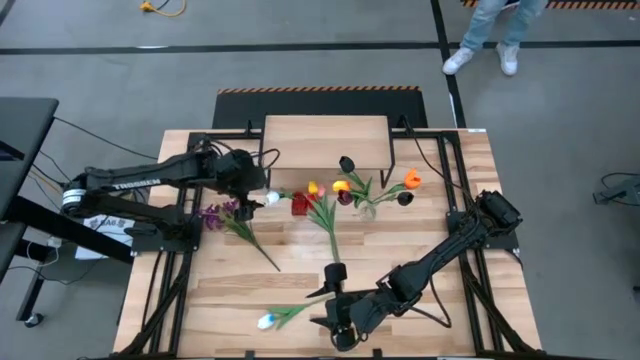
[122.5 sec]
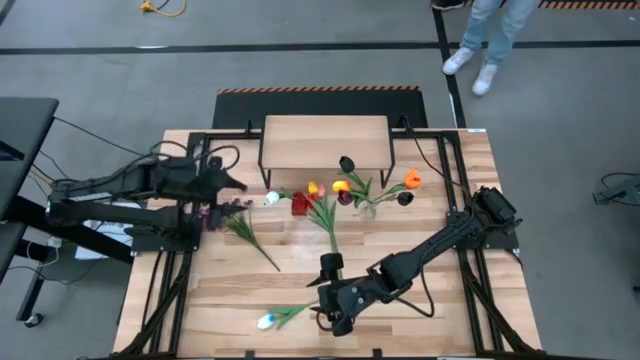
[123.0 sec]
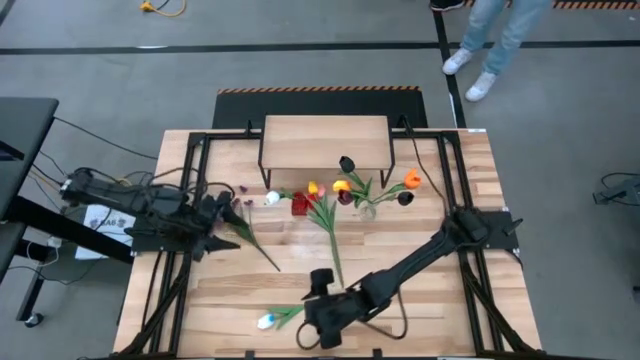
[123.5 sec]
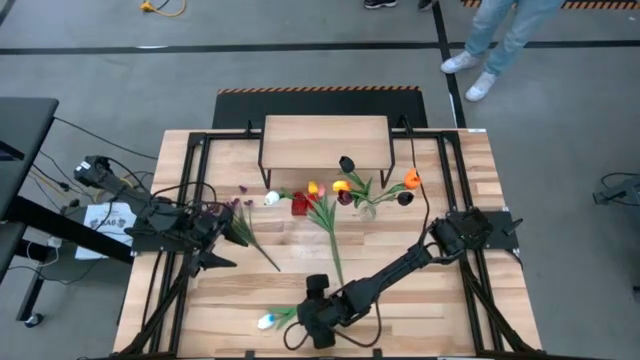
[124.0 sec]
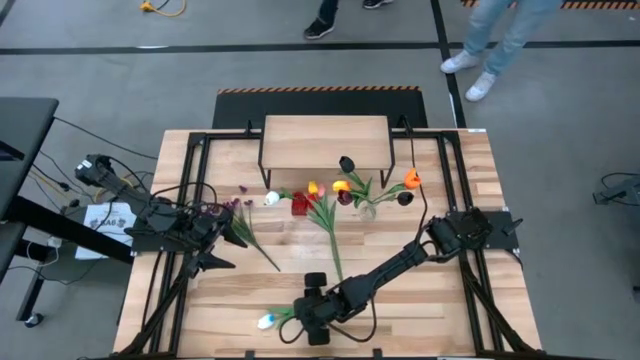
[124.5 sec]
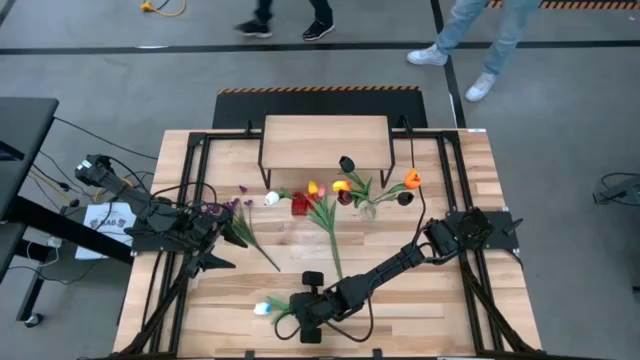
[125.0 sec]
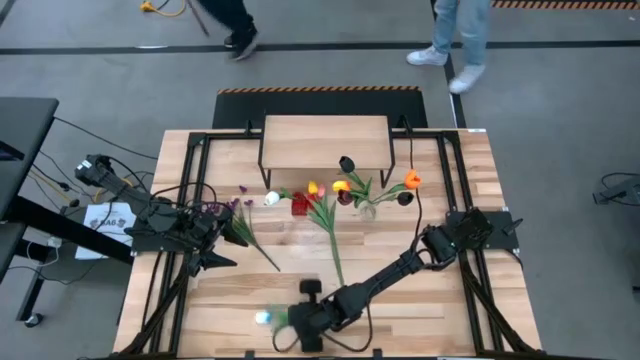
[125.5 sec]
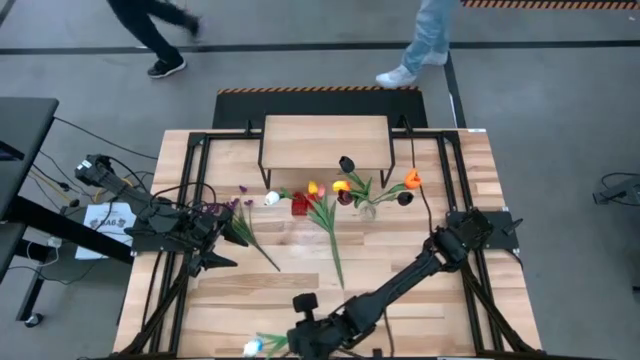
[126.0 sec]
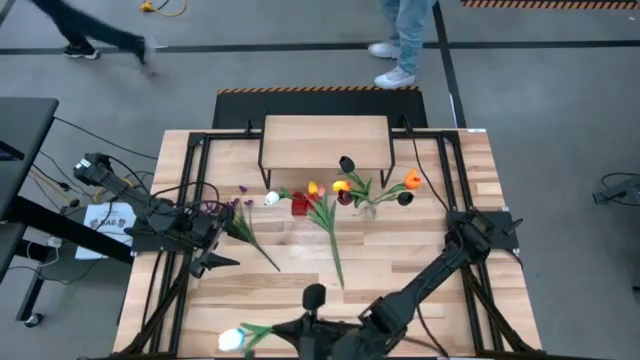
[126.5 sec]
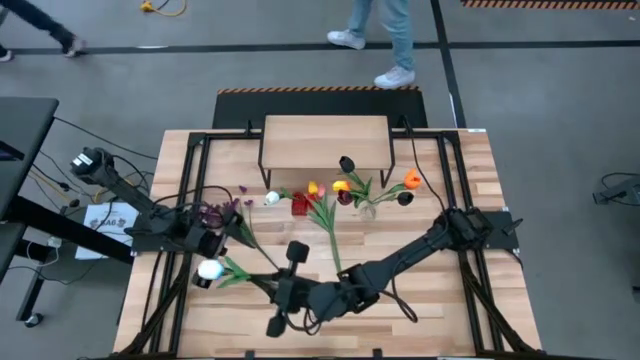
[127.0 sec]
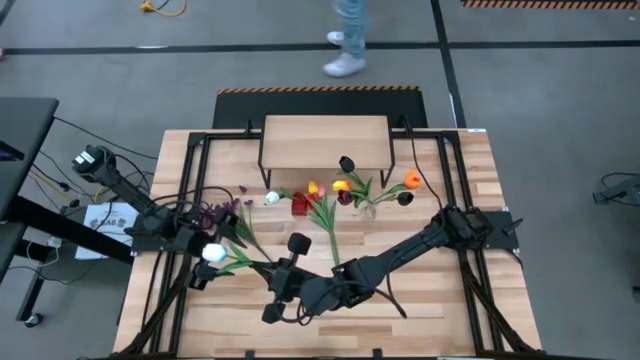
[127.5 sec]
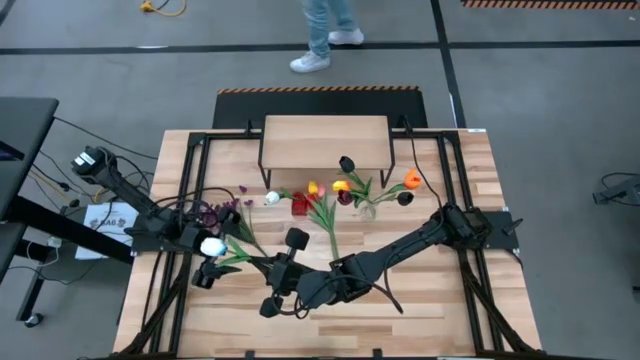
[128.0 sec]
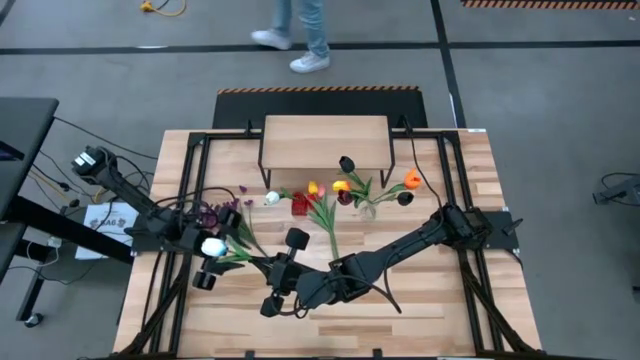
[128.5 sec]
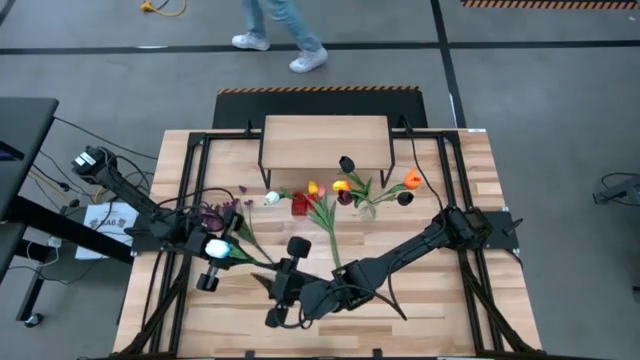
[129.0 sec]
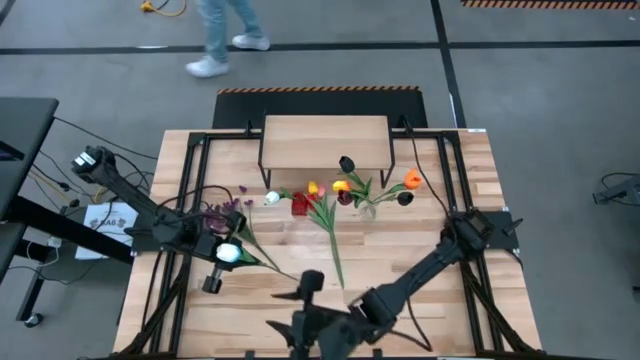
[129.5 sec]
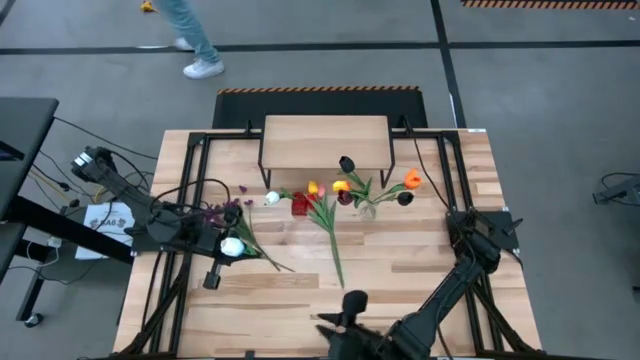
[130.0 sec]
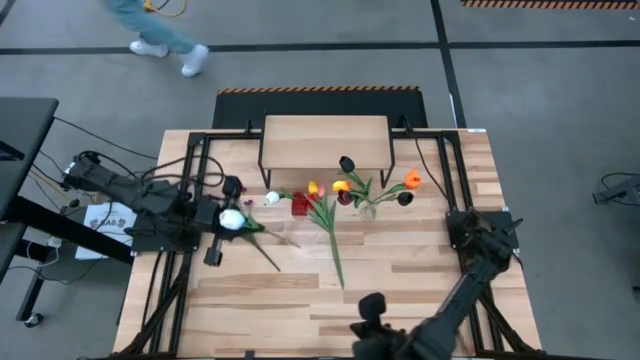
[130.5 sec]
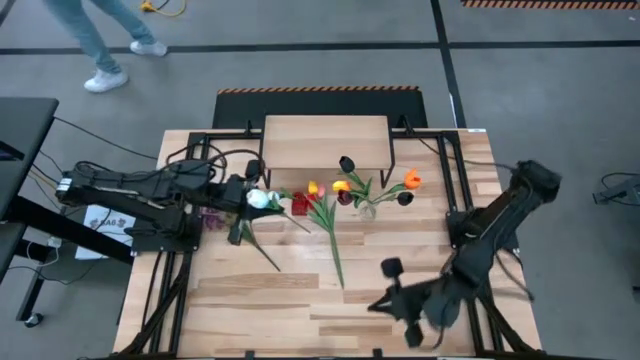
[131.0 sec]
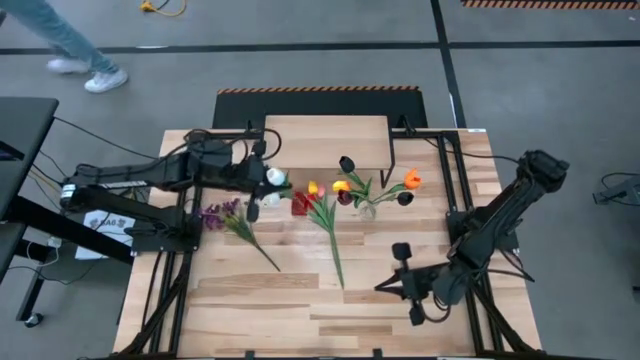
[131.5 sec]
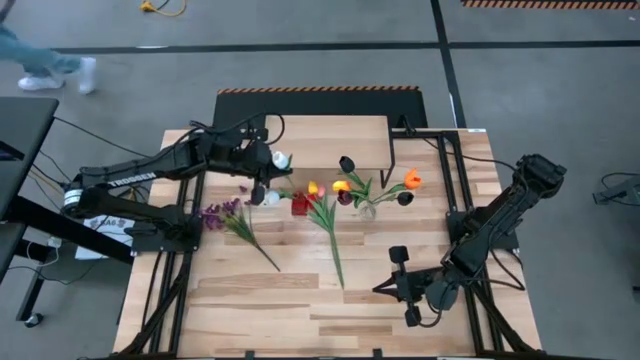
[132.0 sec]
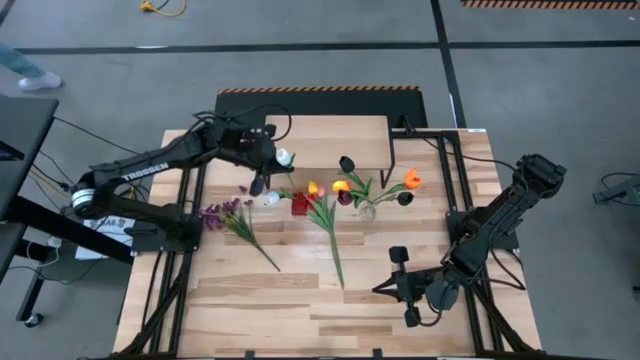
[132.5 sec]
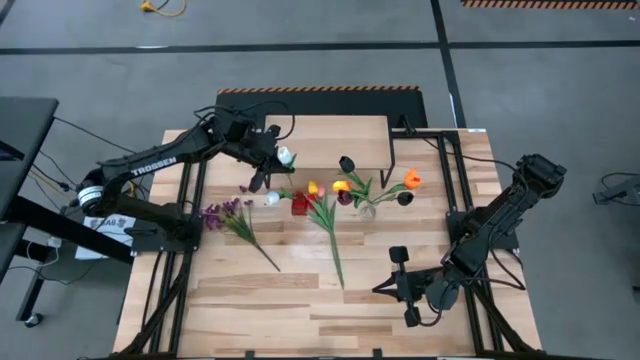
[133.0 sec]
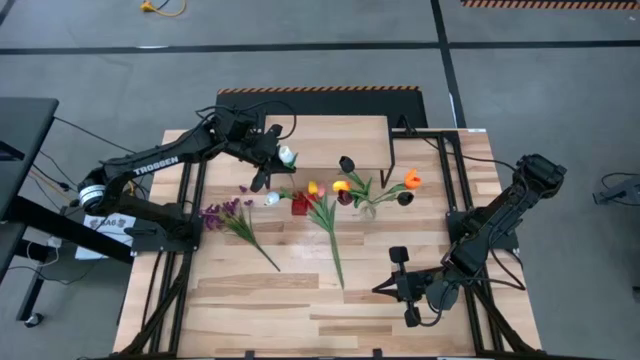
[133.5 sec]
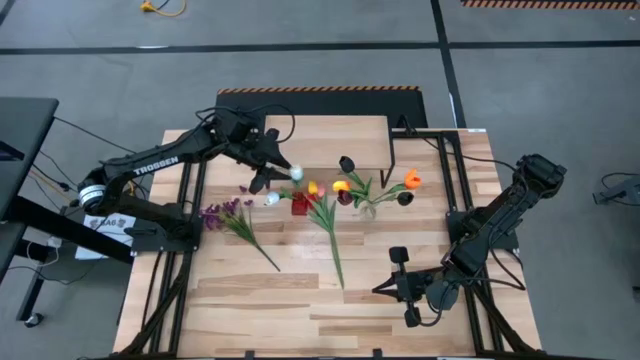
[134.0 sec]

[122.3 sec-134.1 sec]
Task: Pick and place flowers into a vace then onto a shelf
Put the white flower into the red vase

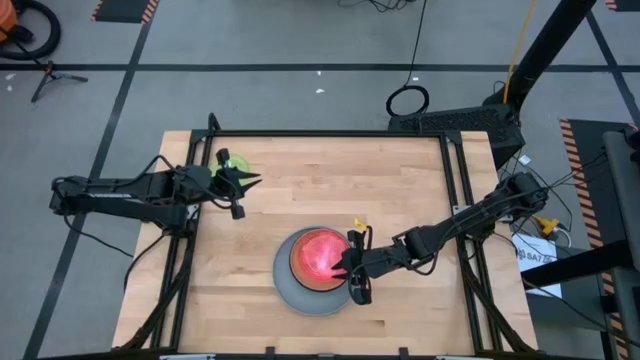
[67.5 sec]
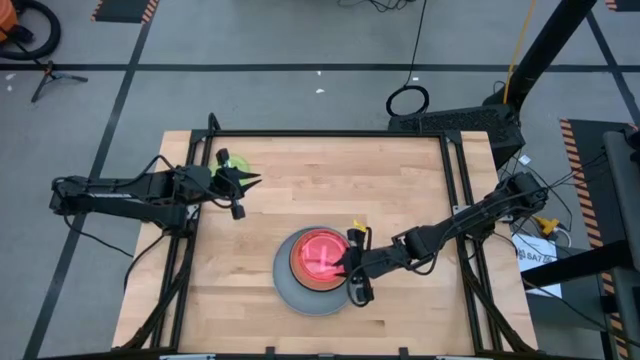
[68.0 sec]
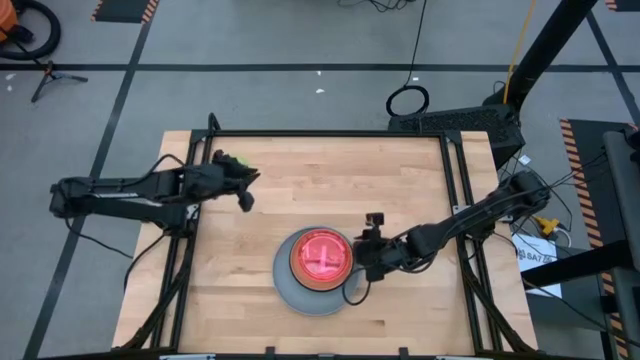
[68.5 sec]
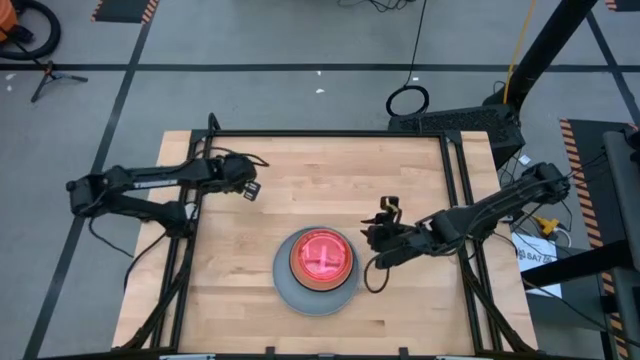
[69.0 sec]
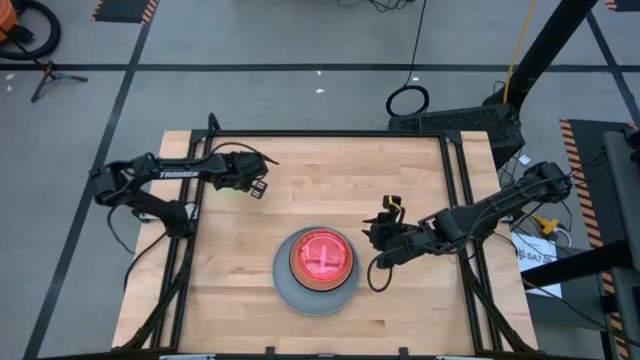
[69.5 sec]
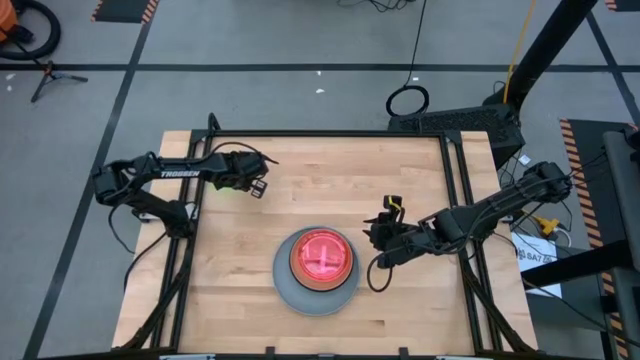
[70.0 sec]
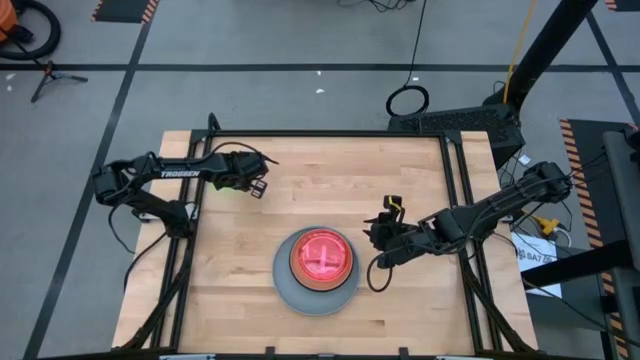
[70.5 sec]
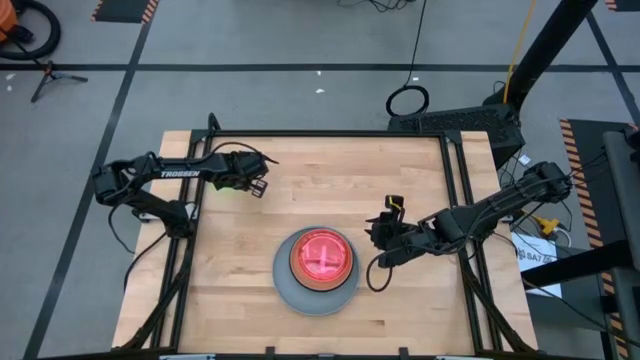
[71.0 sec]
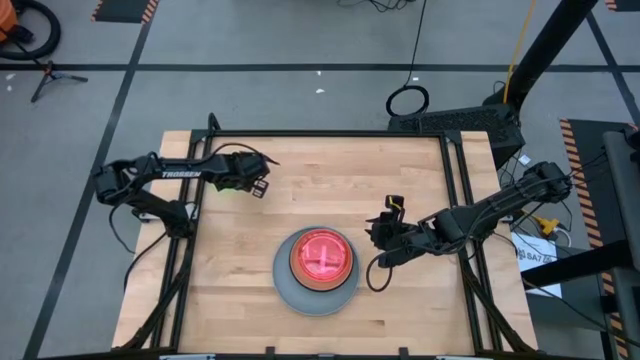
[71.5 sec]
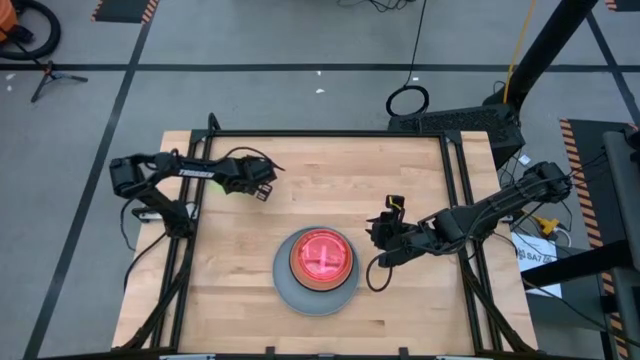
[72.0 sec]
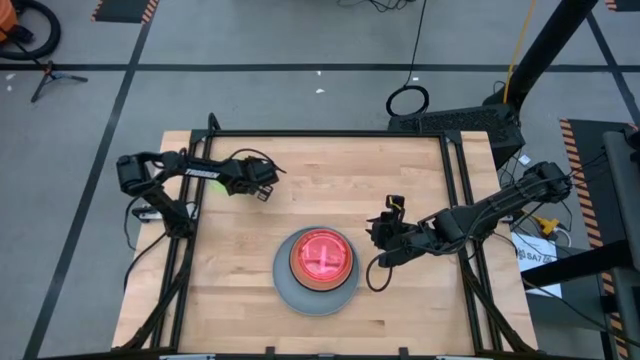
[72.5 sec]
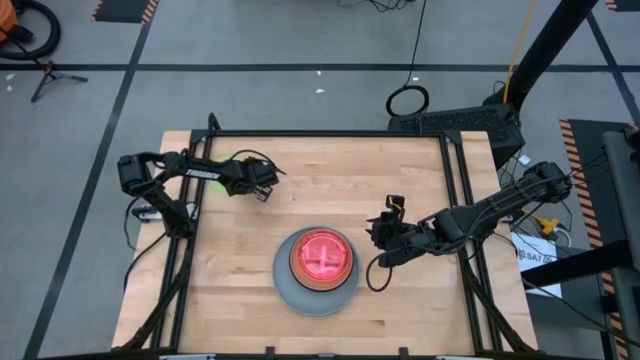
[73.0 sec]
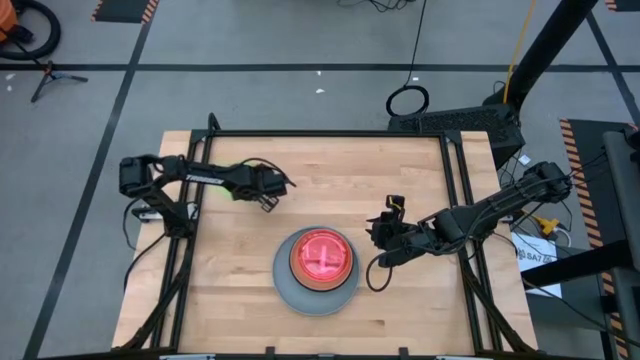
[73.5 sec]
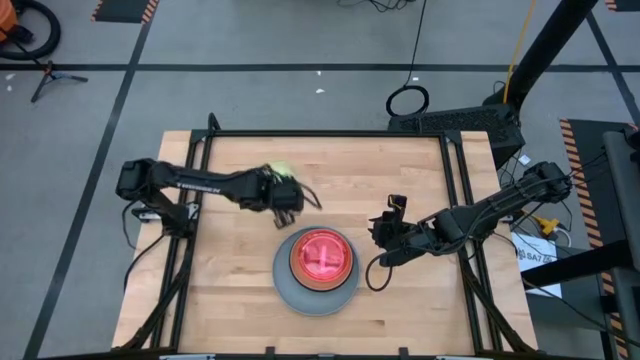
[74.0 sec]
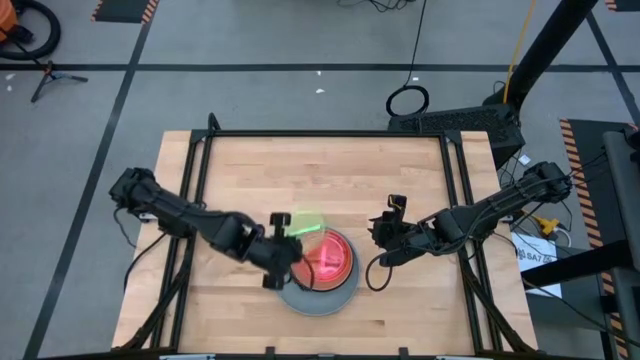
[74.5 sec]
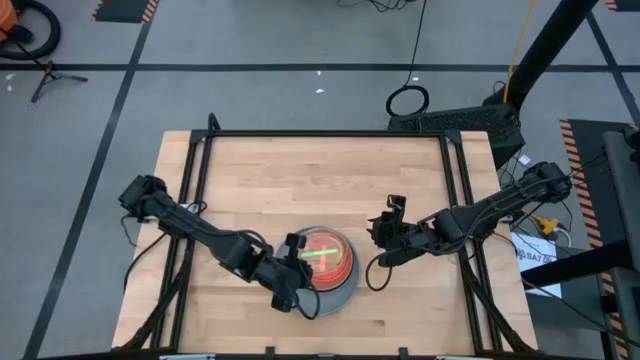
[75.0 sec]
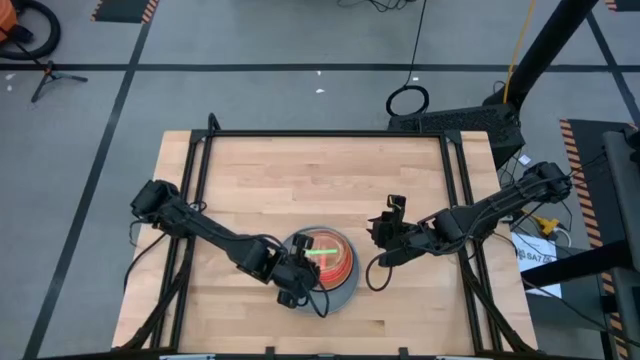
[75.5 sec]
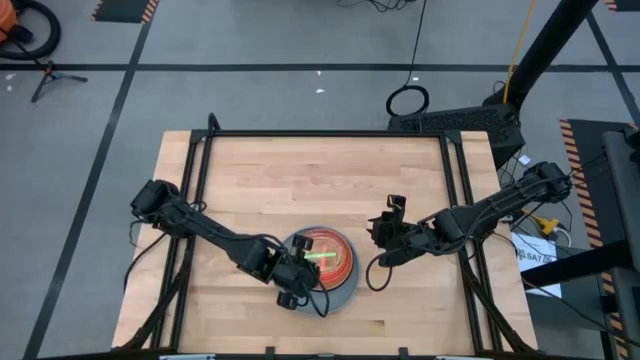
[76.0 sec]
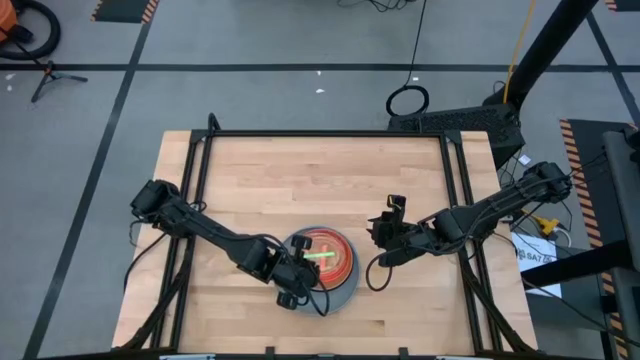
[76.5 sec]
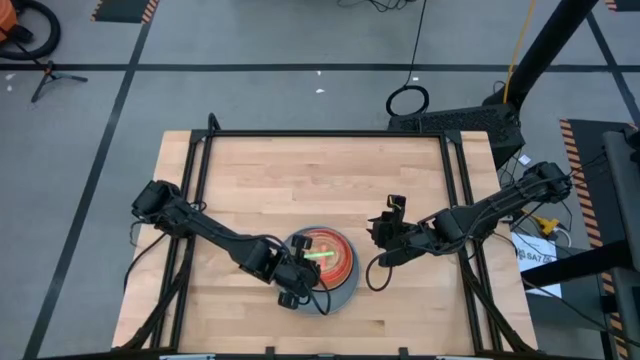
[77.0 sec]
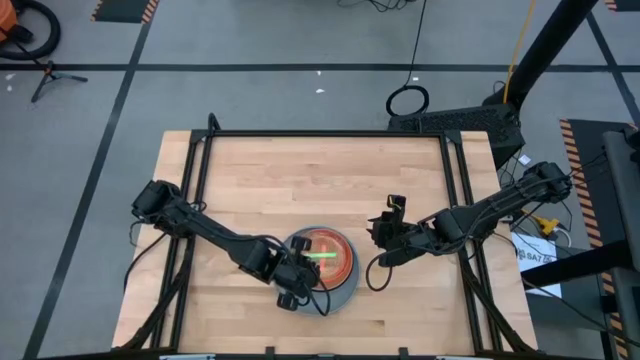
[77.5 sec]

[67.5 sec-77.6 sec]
Task: Stack plastic plates
Stack the green transparent plate on top of the red transparent plate
